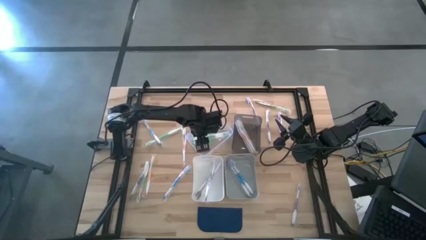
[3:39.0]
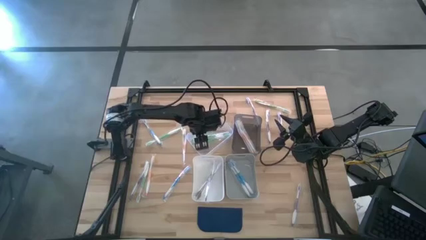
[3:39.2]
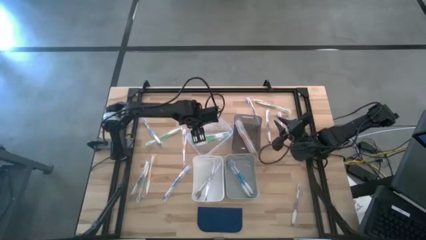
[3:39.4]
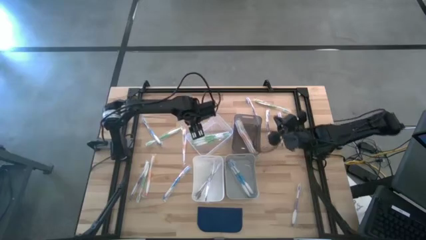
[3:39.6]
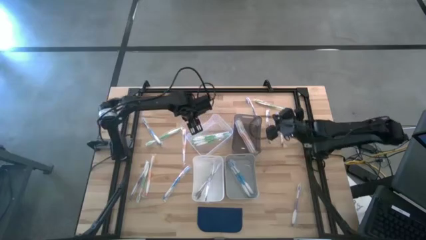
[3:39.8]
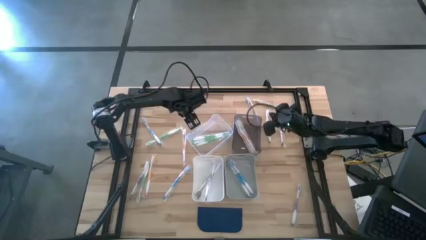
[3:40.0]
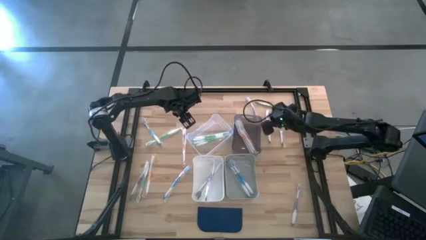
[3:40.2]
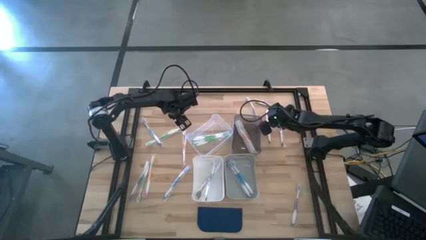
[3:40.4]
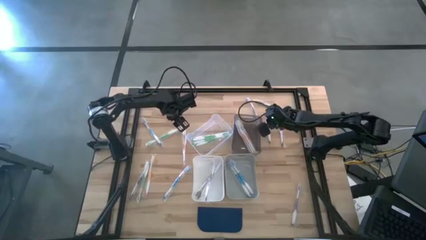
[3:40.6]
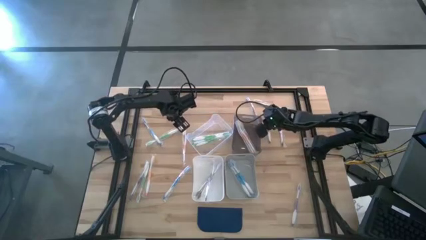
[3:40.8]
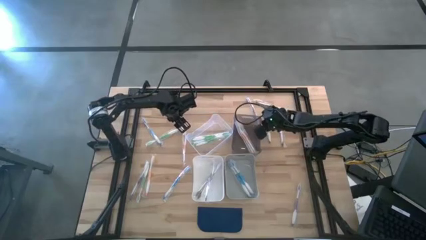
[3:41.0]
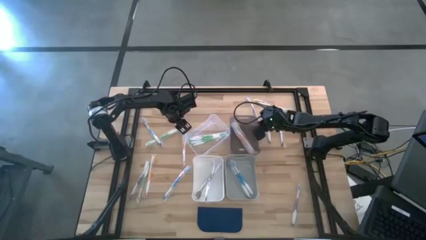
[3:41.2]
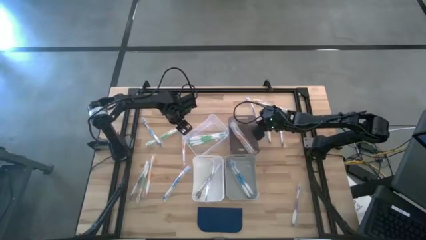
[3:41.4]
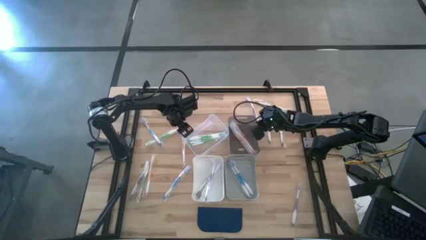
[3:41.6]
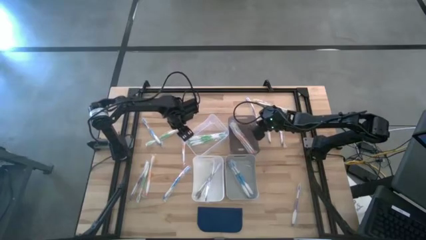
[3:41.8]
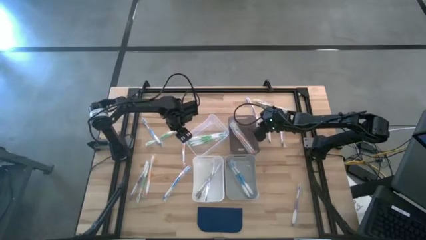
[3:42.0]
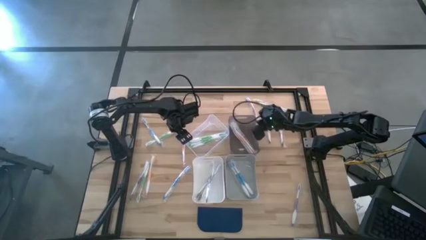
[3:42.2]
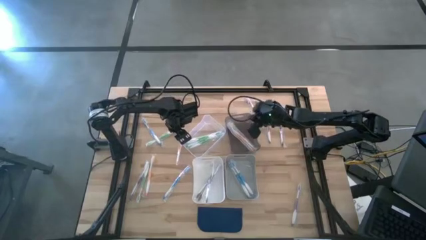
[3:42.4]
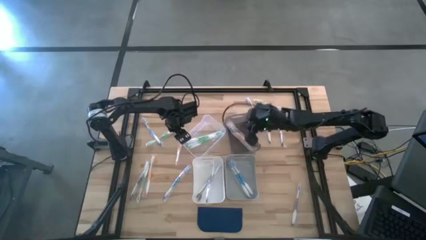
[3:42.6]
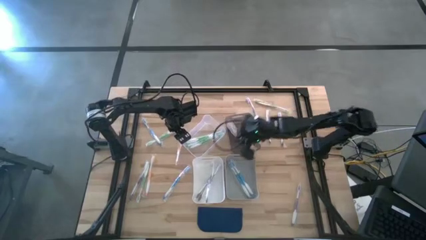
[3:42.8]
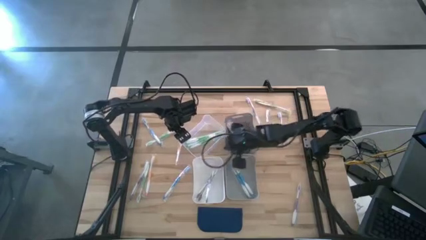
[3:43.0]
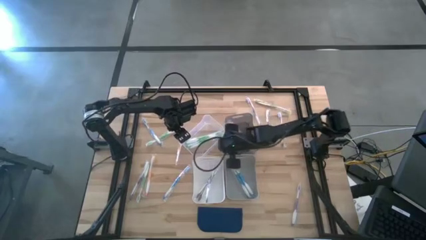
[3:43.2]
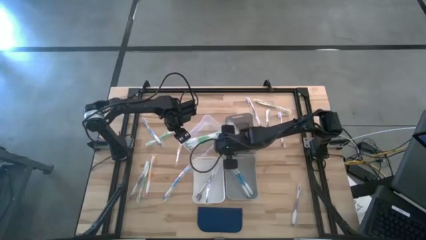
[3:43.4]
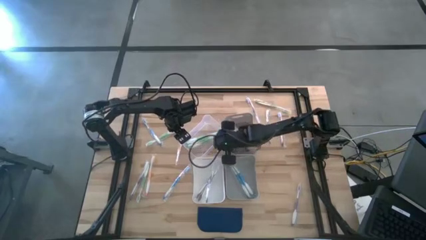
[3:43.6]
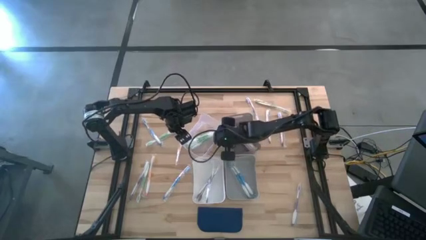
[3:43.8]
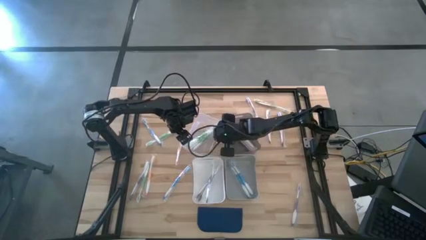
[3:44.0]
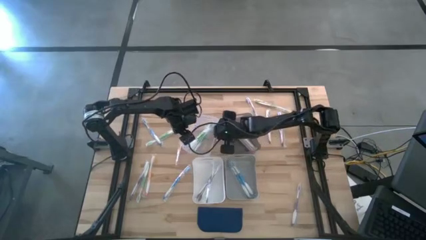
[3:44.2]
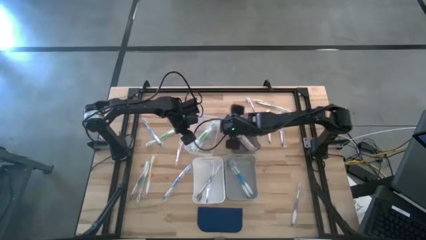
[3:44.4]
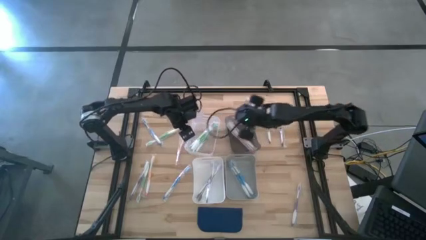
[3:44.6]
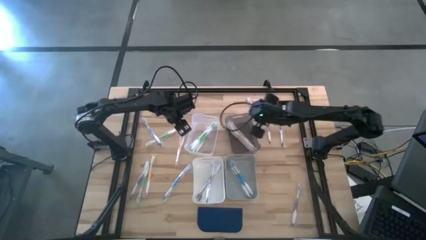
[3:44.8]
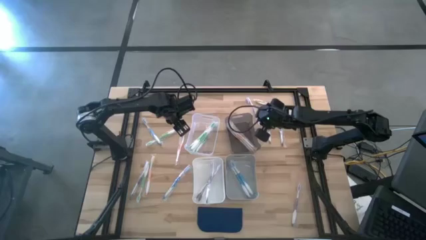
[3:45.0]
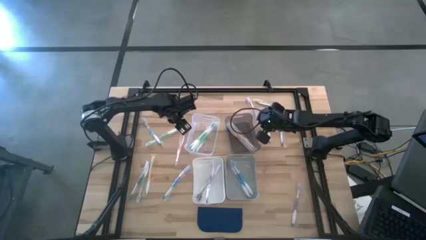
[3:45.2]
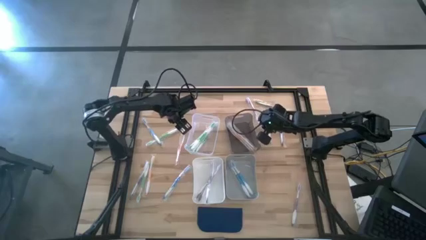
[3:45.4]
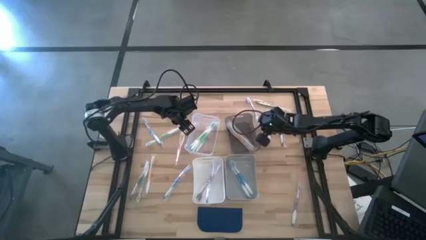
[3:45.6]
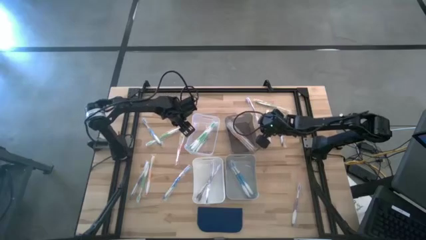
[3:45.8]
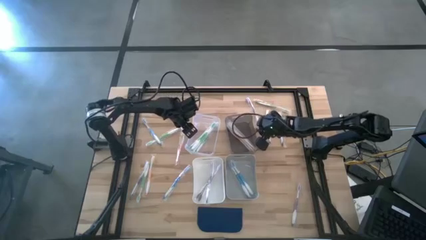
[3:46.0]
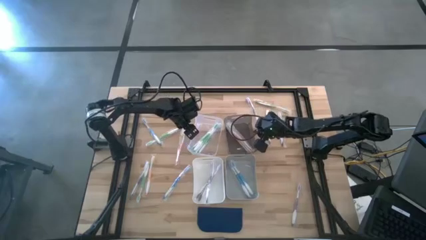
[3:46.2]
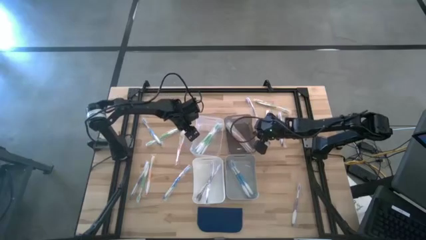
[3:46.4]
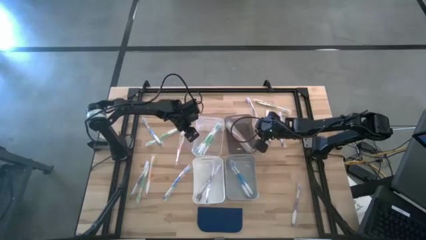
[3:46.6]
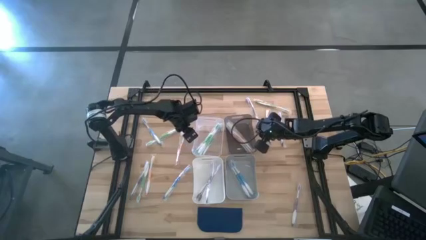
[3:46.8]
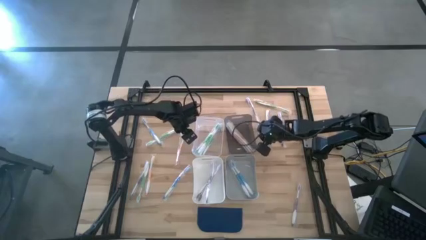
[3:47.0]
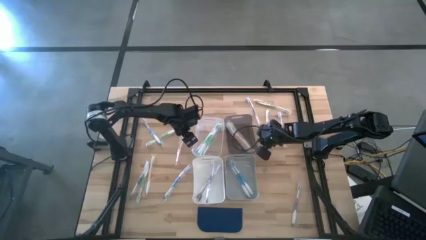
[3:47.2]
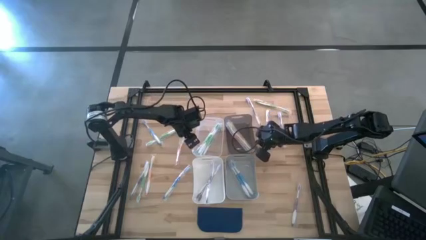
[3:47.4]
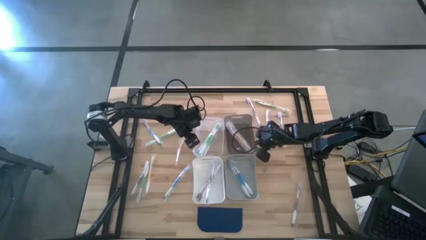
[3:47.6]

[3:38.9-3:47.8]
Task: Pick & Place Toothbrushes
Adjust the bins

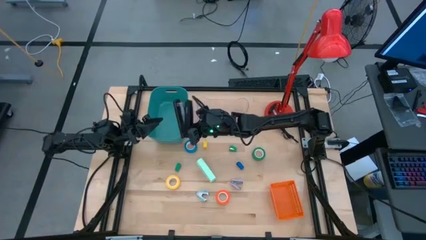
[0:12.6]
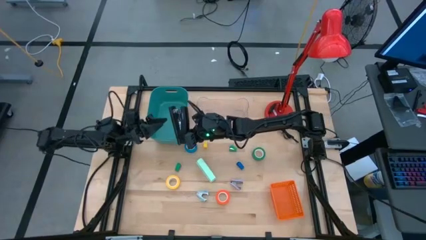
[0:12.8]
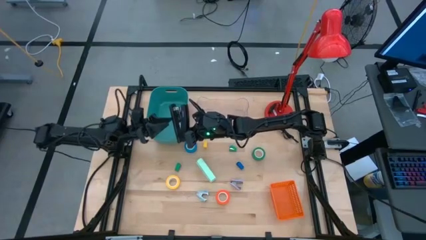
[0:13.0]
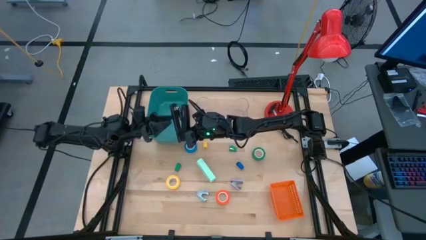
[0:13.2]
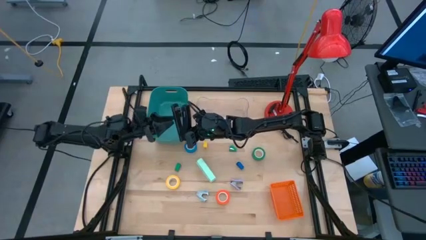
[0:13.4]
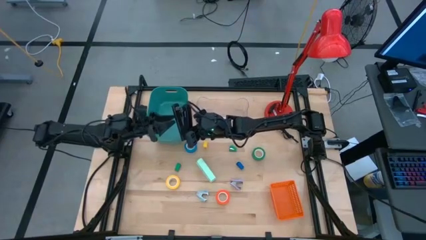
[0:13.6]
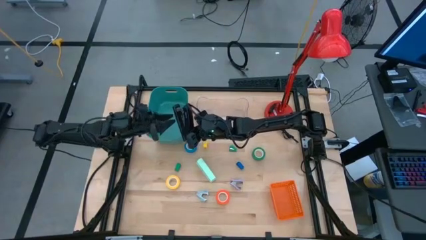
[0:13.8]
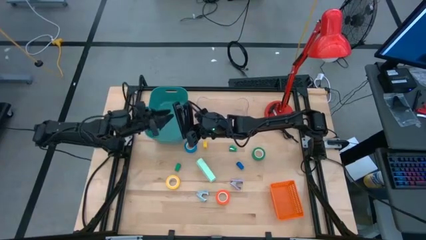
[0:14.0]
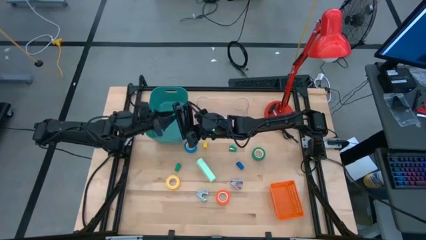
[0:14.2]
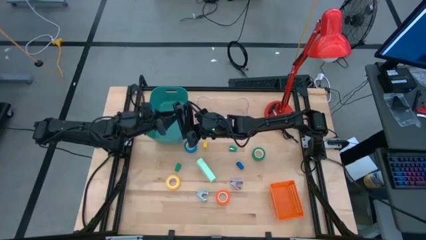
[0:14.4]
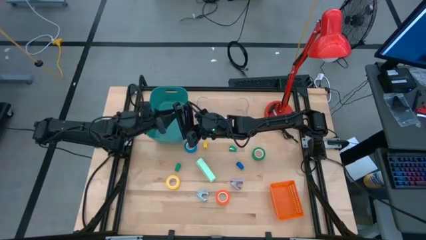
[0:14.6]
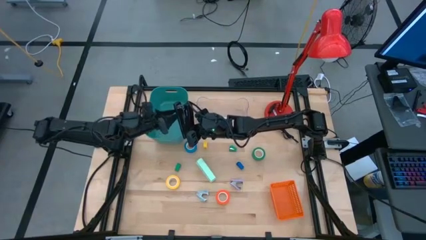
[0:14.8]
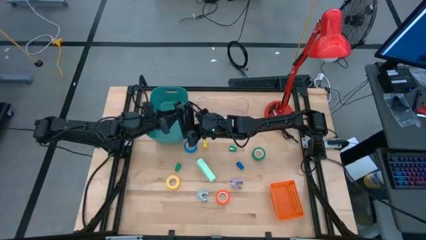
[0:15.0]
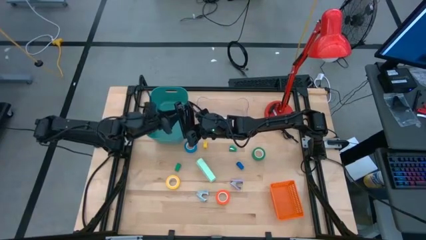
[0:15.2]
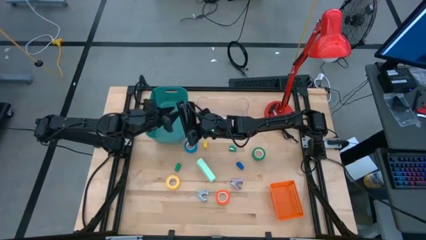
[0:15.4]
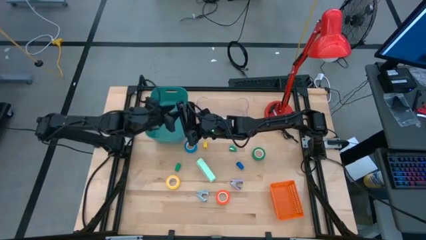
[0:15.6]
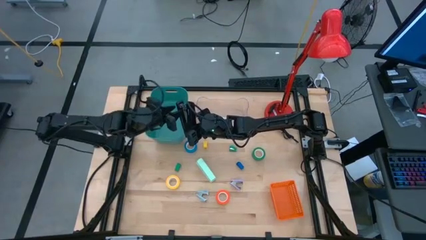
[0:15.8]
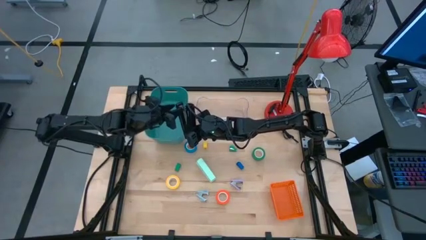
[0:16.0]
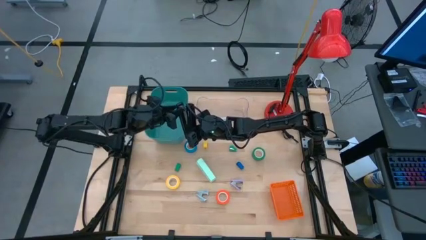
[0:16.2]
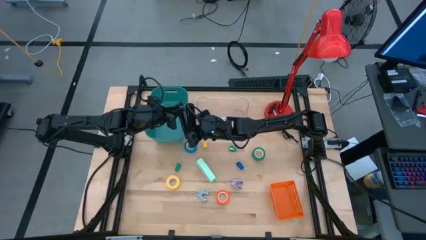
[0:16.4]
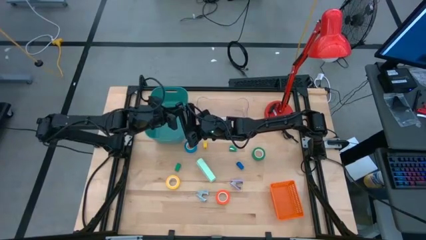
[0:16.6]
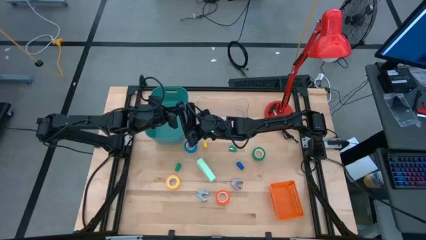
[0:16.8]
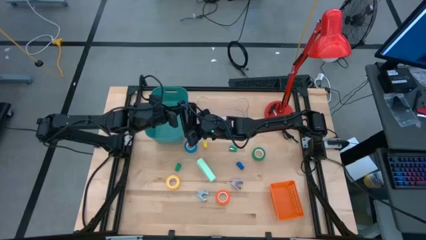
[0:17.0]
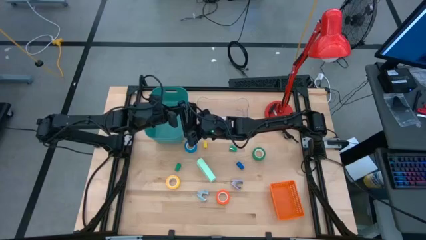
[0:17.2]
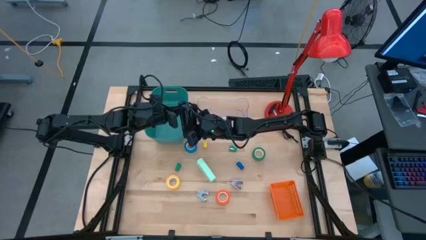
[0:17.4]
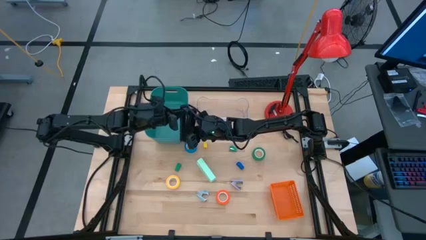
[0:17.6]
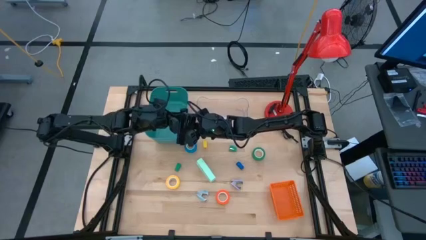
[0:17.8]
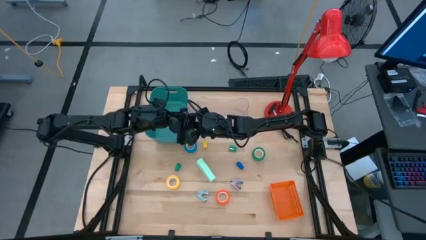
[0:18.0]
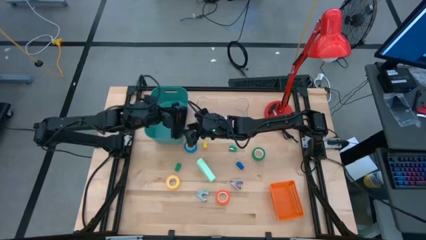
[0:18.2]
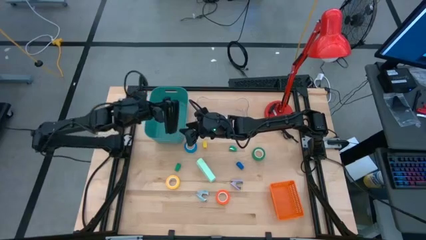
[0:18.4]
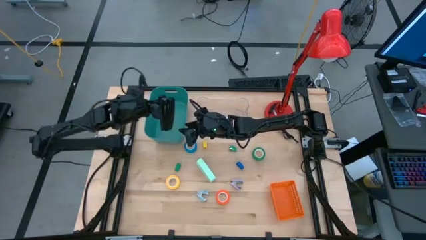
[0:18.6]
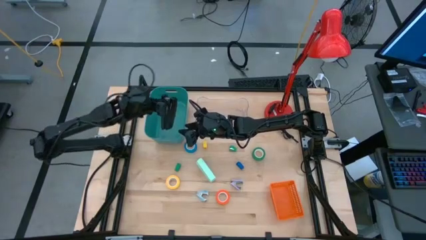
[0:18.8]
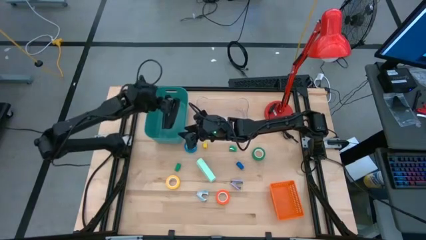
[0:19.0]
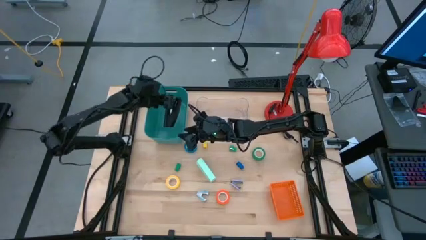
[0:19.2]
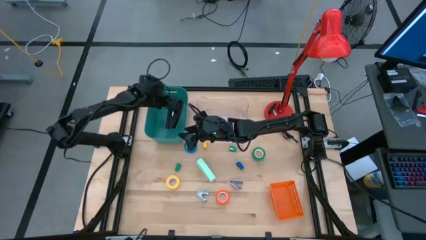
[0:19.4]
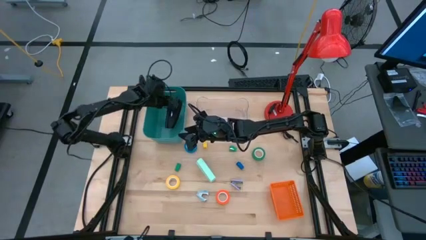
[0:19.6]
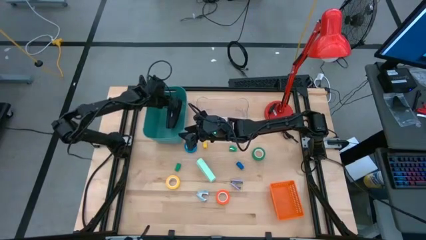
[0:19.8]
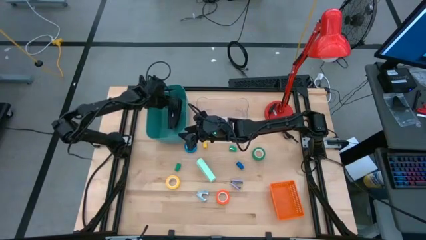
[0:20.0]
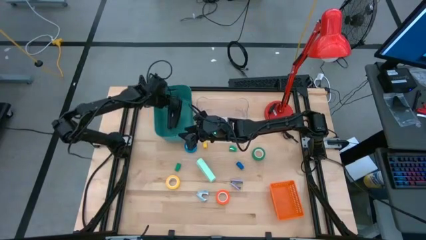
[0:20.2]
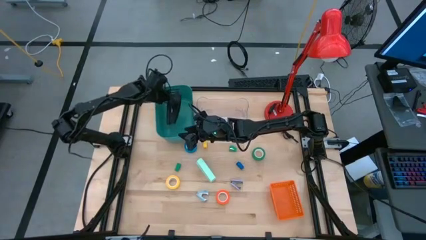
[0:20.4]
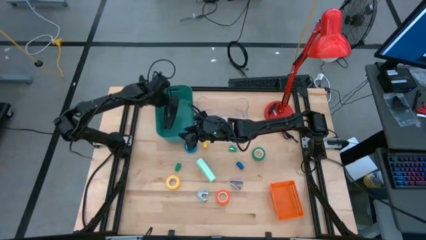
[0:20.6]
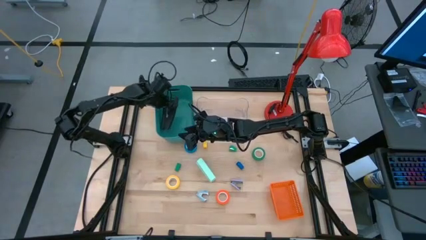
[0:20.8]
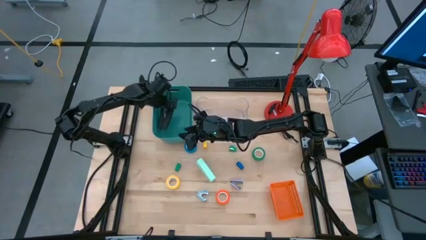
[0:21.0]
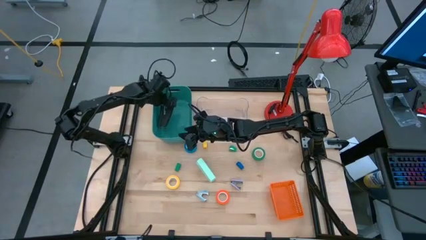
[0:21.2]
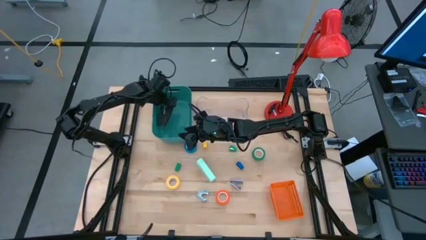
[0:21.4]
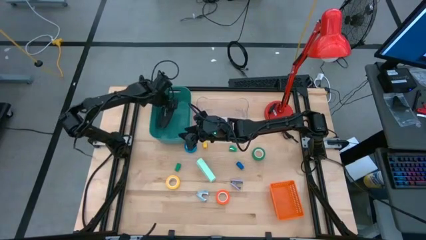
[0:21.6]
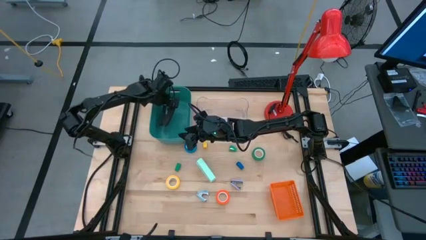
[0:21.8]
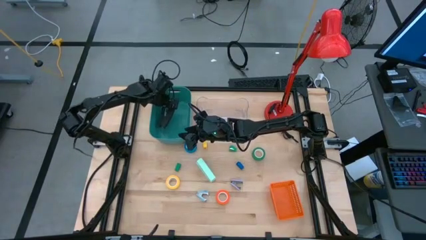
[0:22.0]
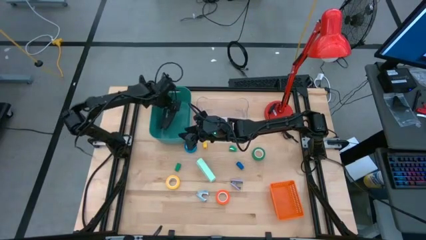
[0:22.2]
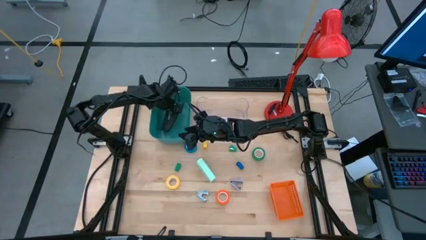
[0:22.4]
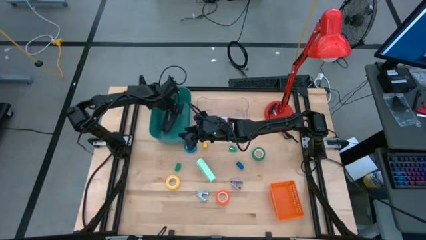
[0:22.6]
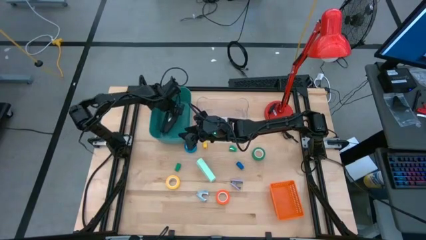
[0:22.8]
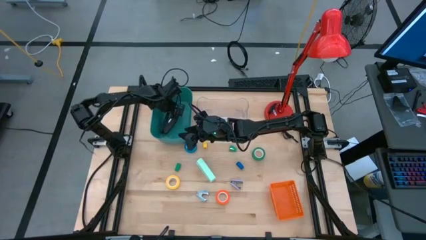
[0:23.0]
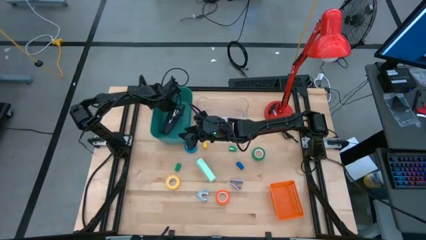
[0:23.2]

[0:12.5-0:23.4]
Task: Pick and place Stapler, Stapler remover, tape
Put the black stapler into the green bin
